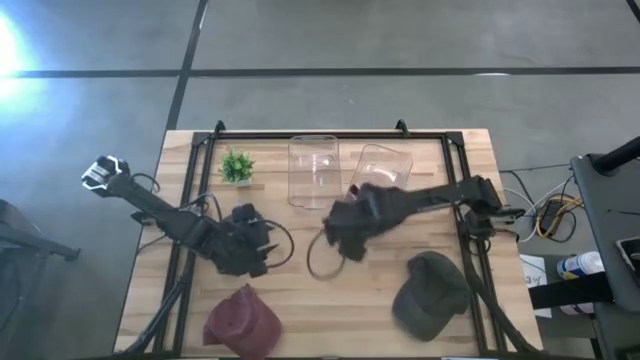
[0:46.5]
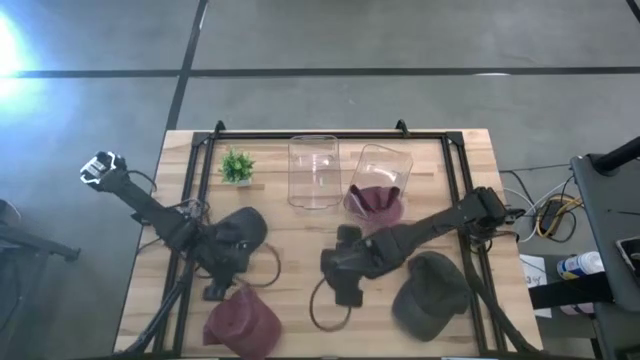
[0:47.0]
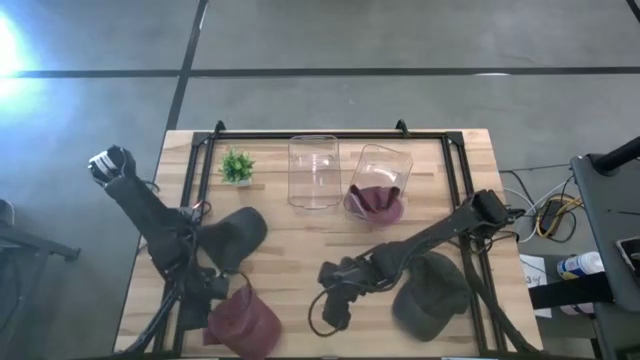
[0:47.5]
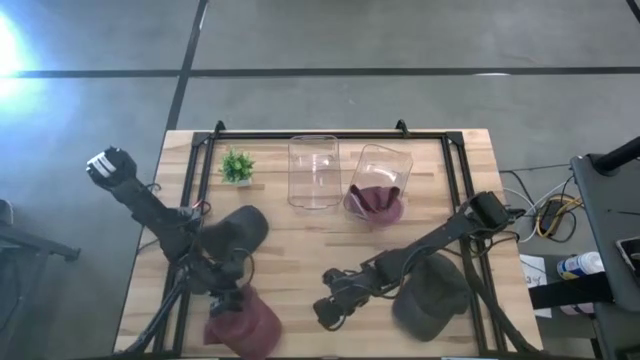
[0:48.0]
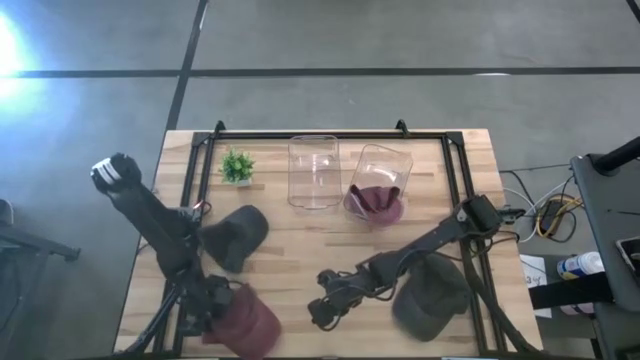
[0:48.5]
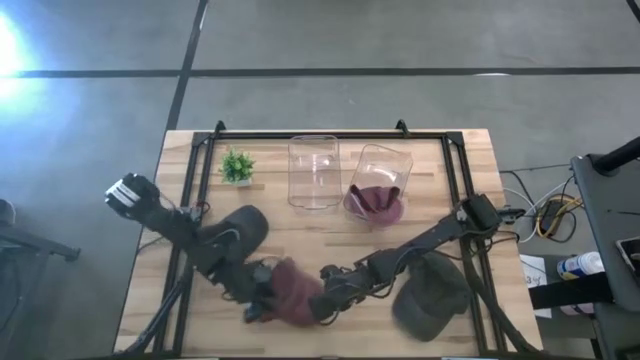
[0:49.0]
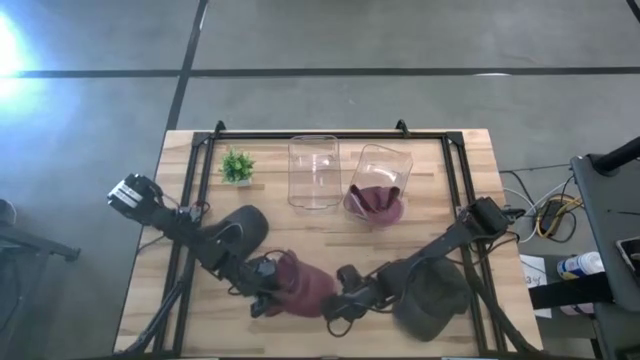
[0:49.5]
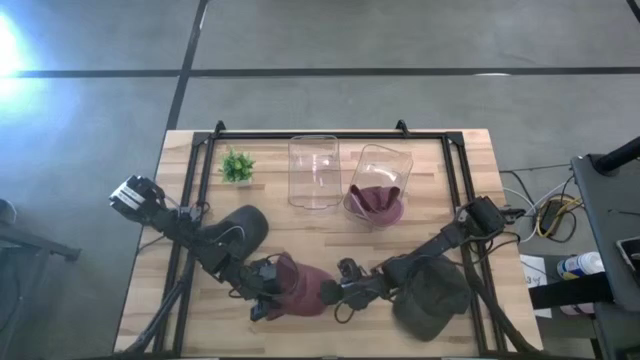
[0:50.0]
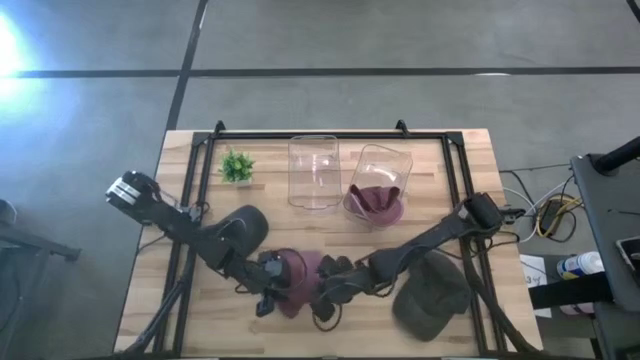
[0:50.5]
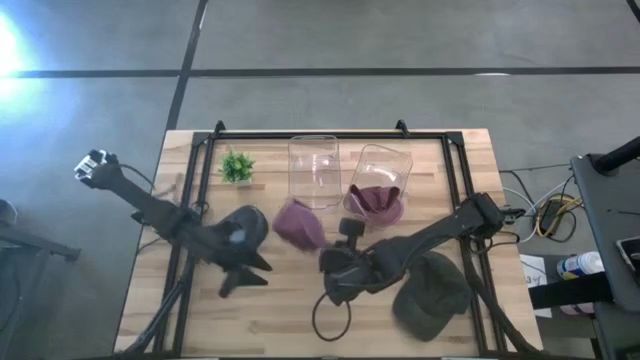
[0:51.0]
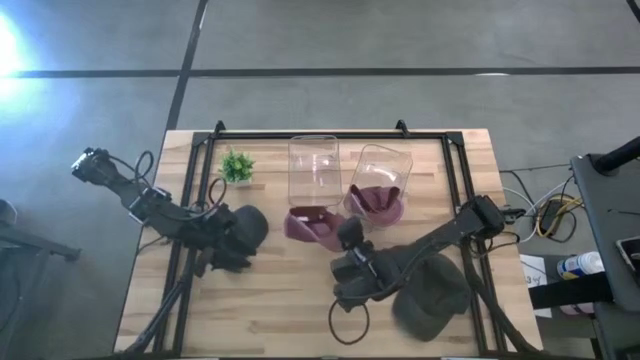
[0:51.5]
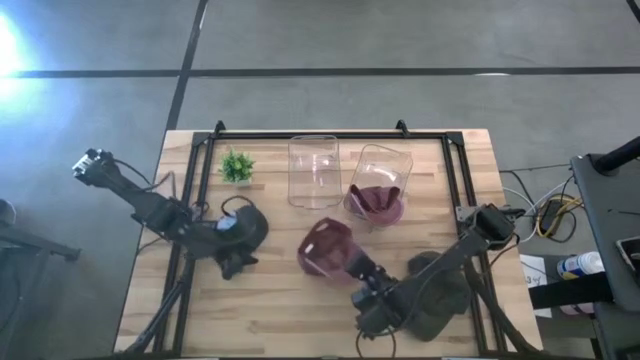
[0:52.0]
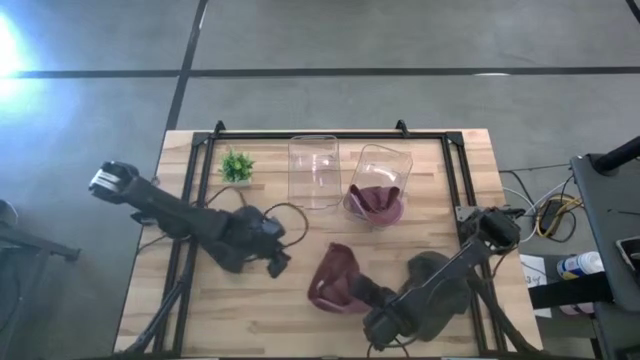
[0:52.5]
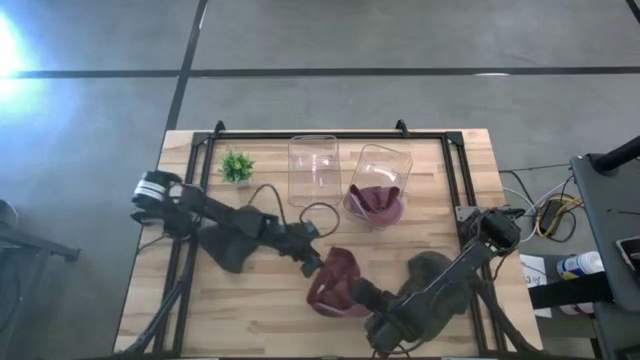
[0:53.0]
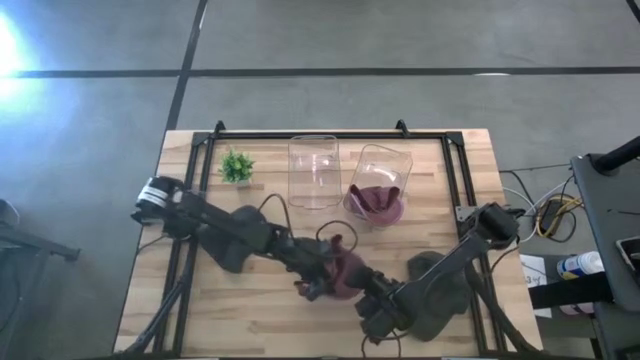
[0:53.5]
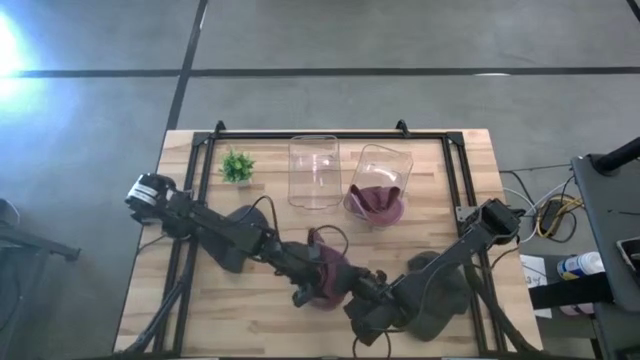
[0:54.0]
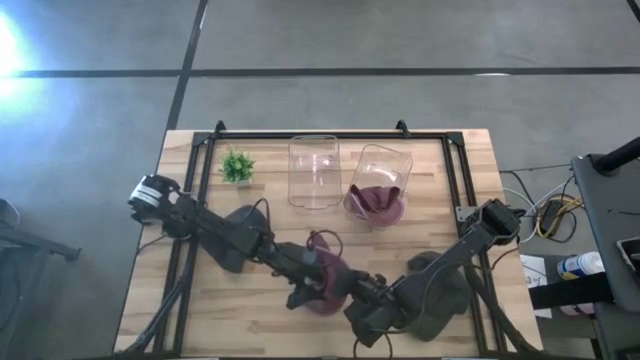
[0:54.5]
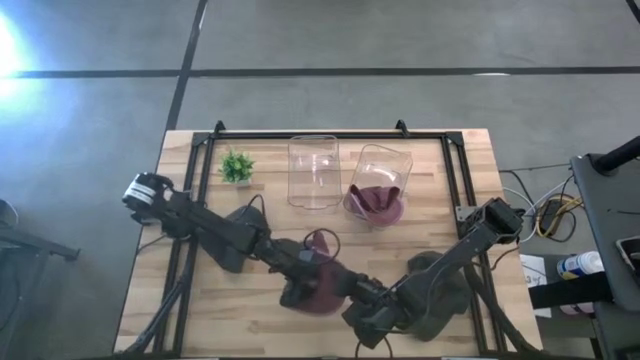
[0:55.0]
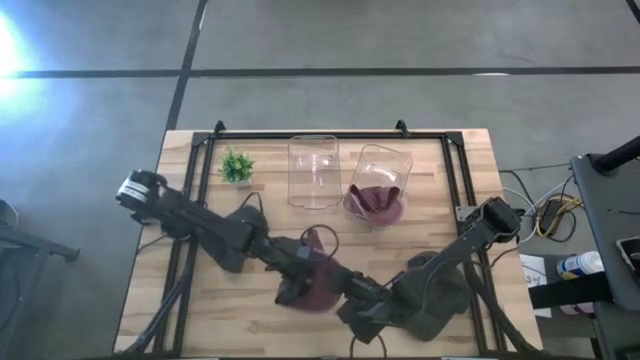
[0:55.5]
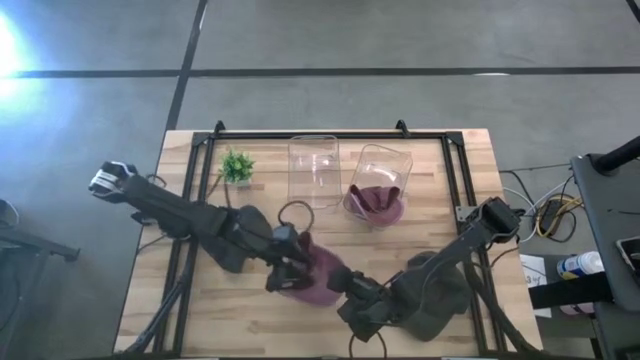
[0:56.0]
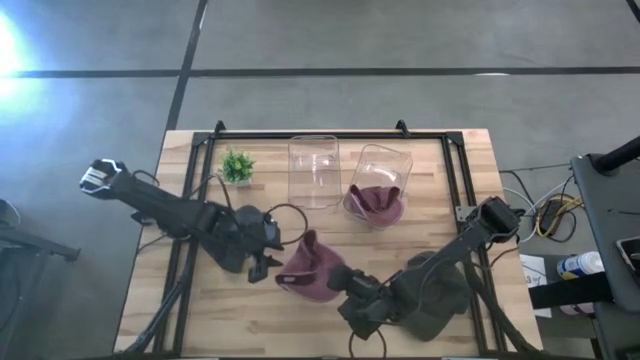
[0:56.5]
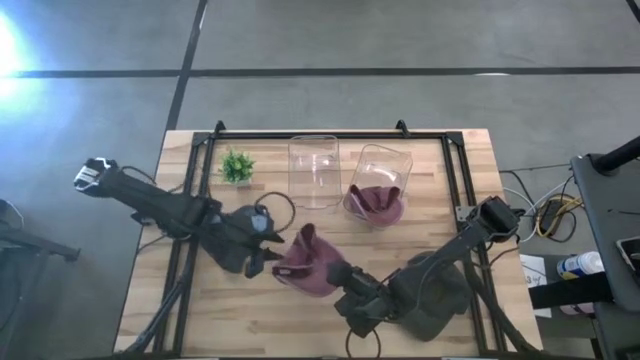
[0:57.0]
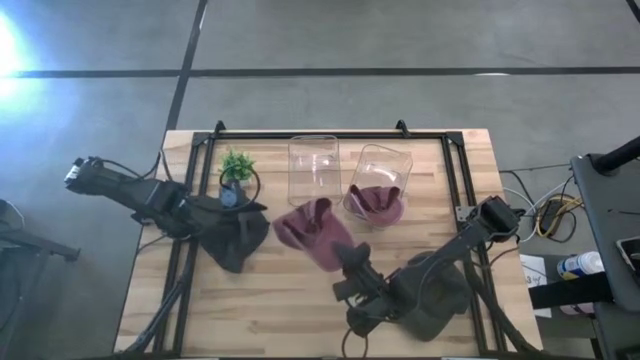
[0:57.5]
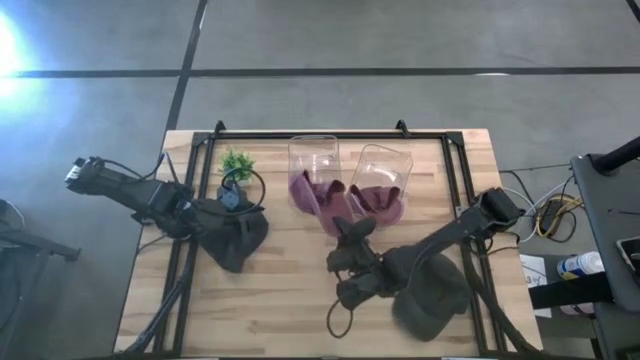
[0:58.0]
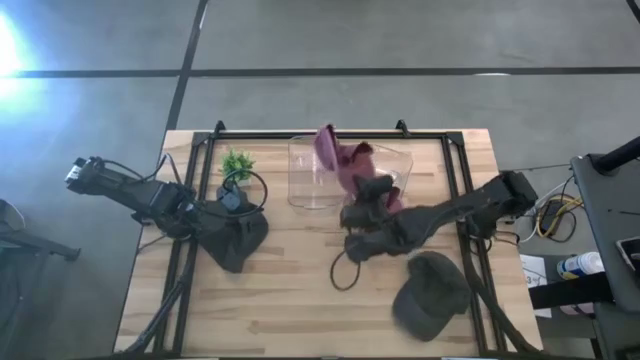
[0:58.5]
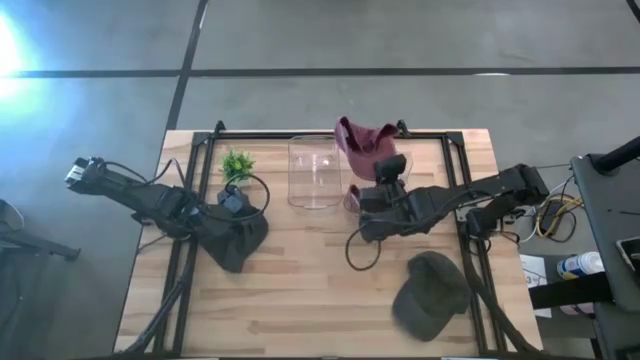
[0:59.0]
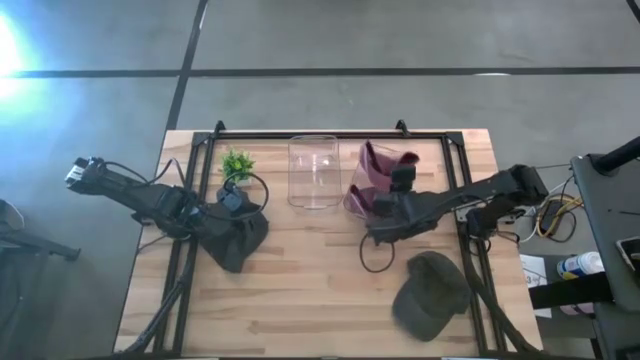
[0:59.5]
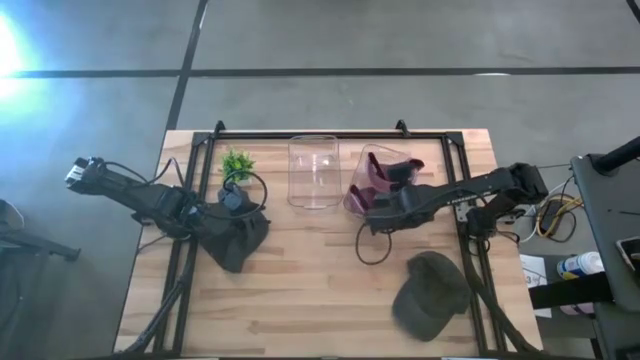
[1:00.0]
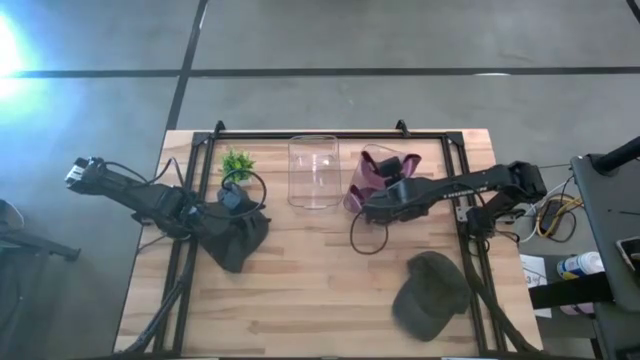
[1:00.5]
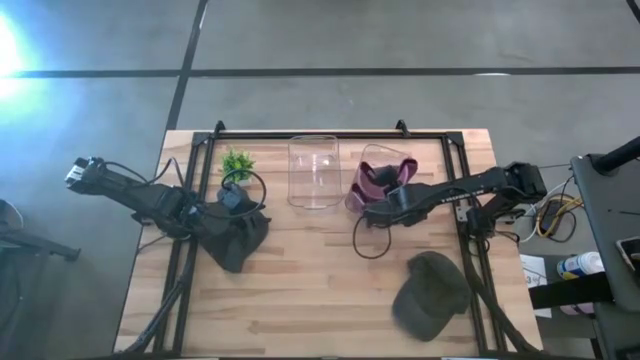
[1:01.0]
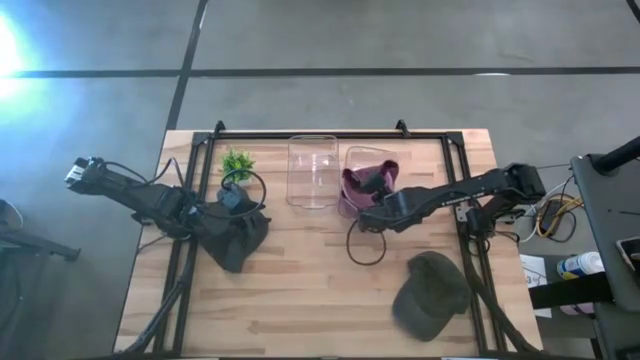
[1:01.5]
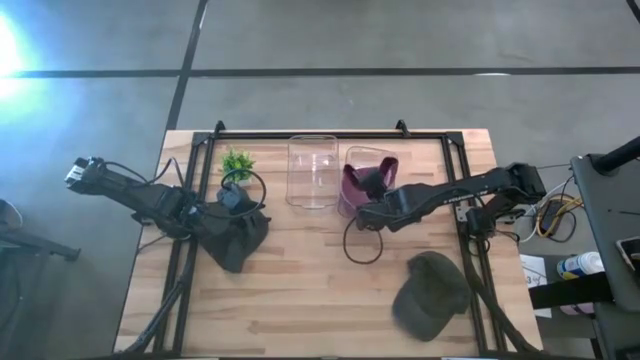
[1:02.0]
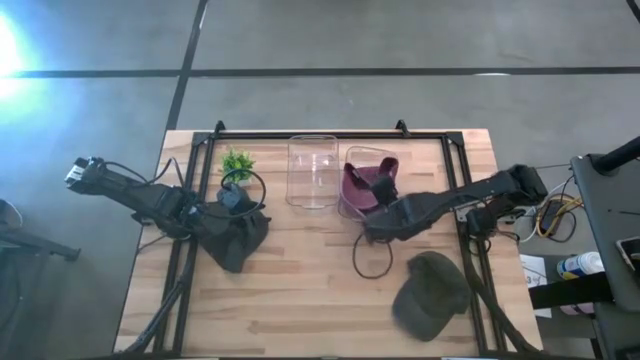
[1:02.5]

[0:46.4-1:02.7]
Task: Pick & Place hat
Put the red cap into the right transparent bin

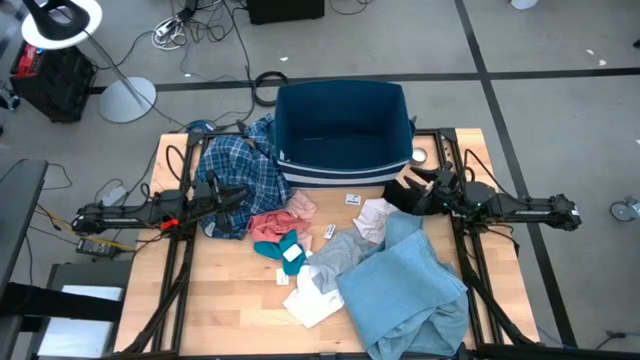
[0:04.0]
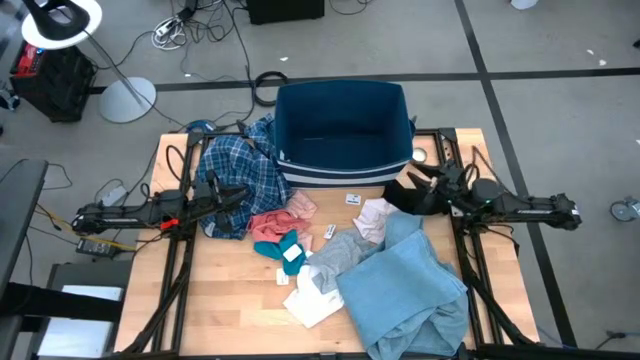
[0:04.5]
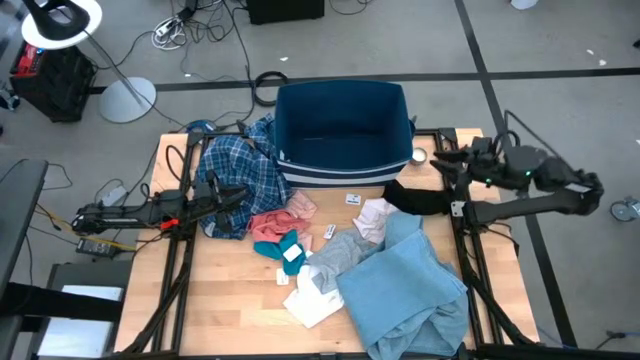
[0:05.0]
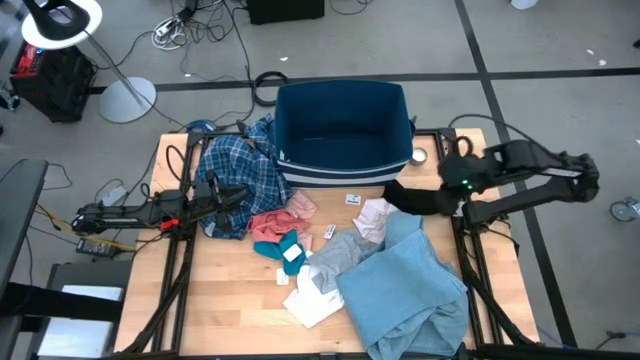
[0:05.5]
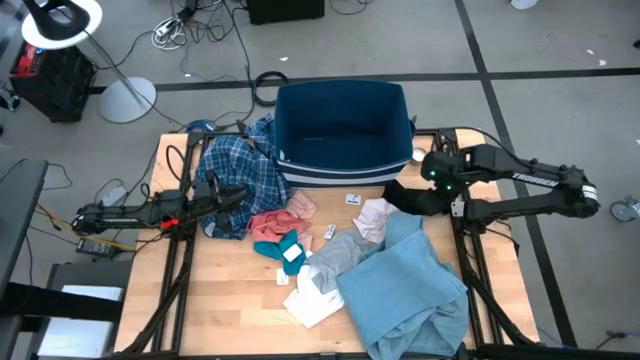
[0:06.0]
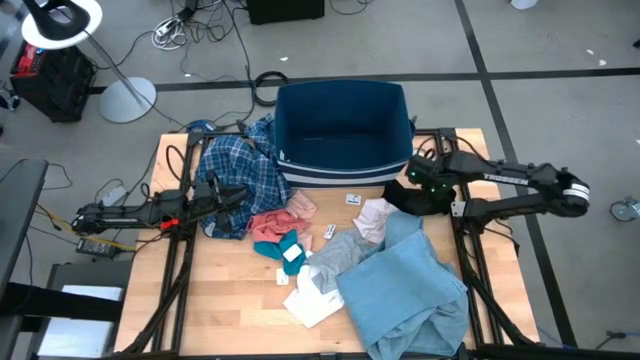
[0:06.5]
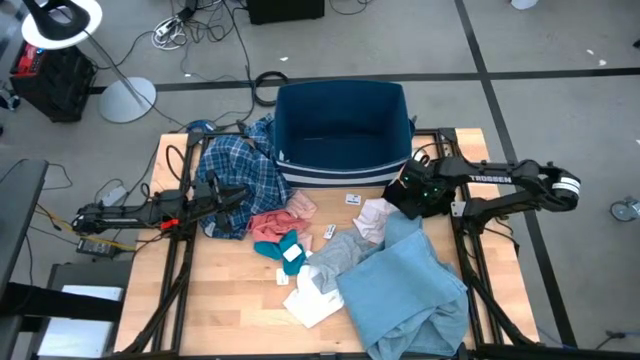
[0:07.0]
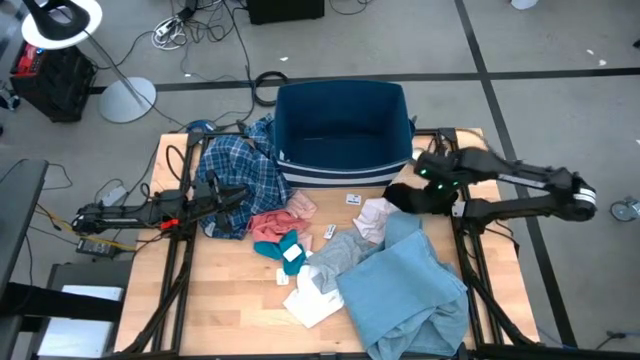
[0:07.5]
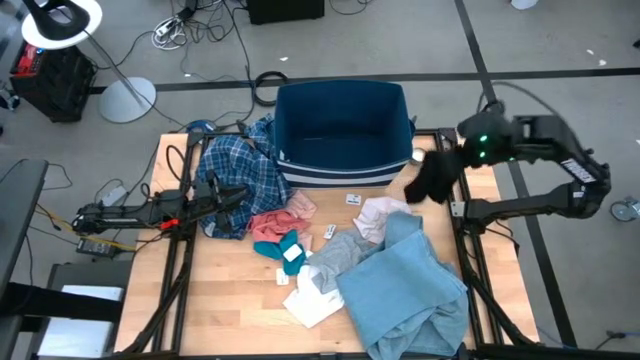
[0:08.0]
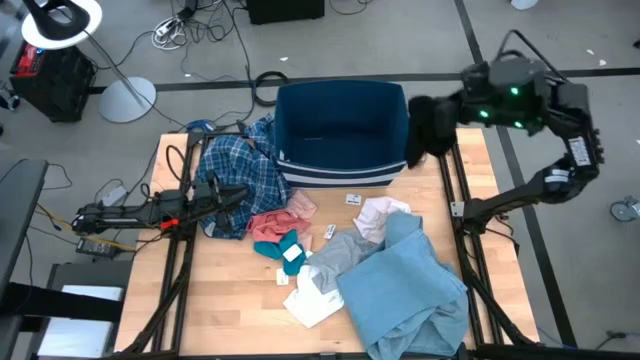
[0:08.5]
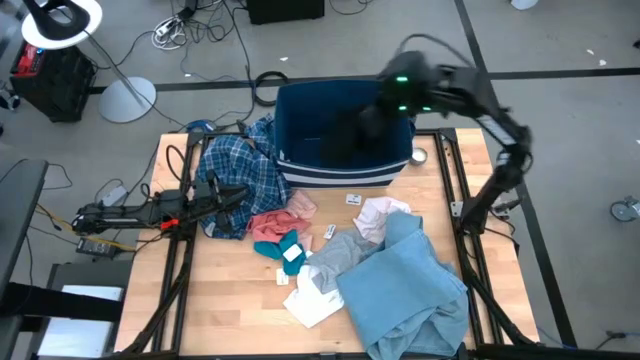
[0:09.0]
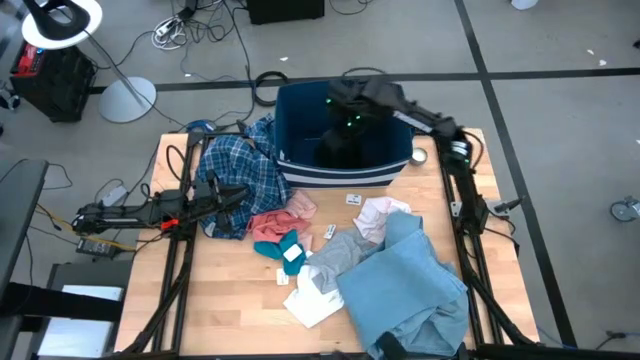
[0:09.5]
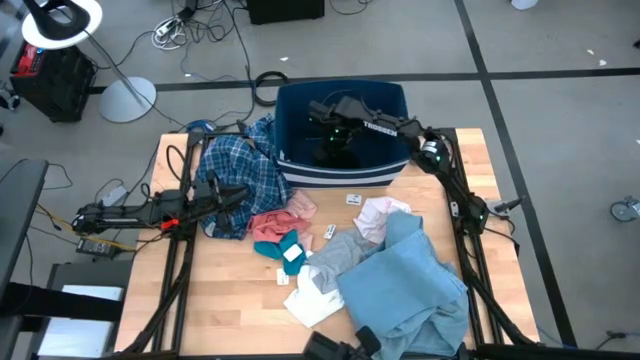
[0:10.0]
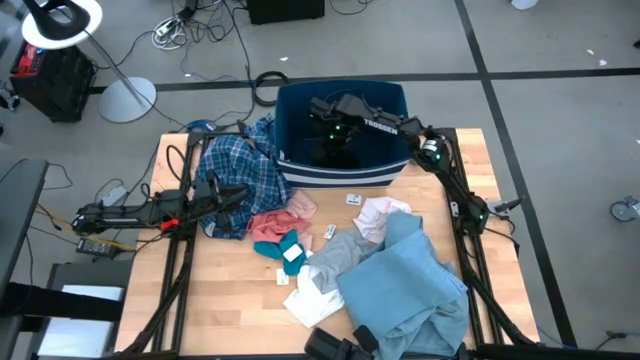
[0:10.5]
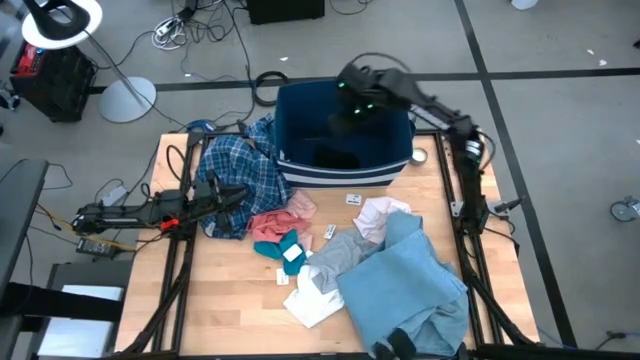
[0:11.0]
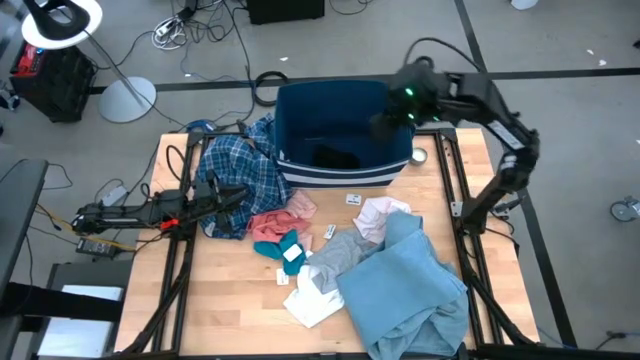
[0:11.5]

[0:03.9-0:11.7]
Task: Sort clothes
Put the black shorts into the blue bin
